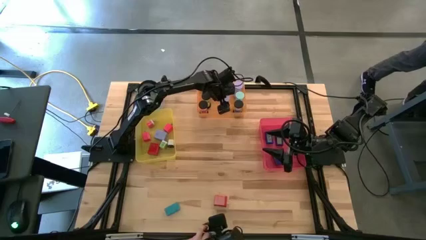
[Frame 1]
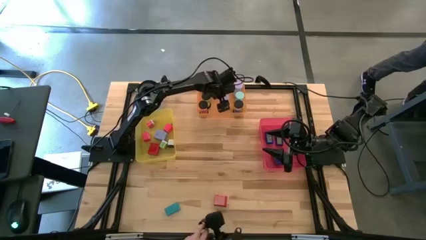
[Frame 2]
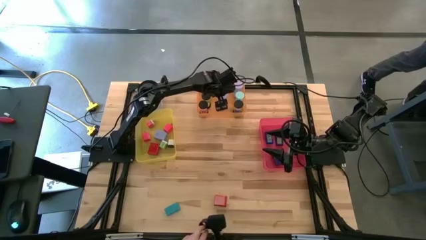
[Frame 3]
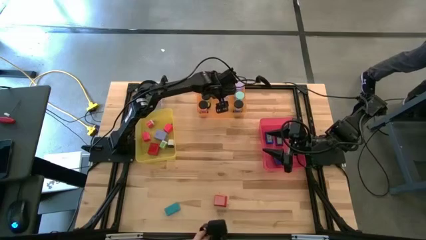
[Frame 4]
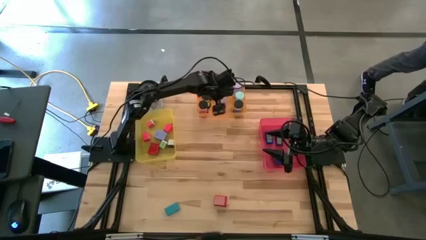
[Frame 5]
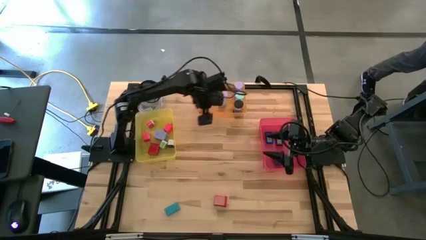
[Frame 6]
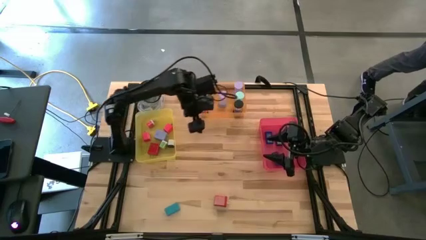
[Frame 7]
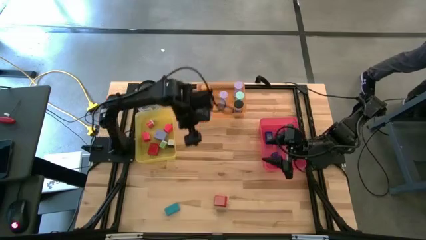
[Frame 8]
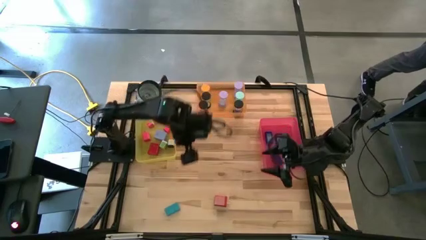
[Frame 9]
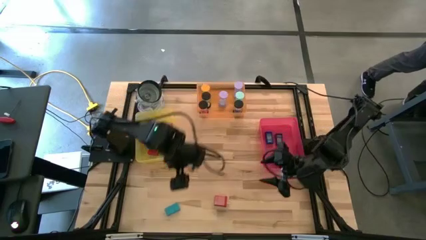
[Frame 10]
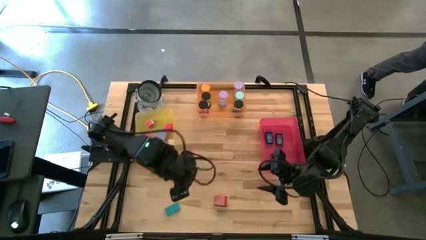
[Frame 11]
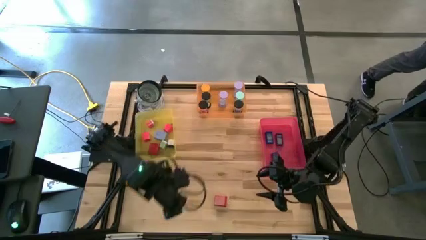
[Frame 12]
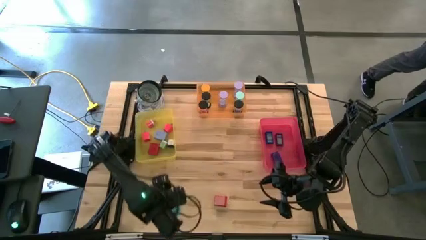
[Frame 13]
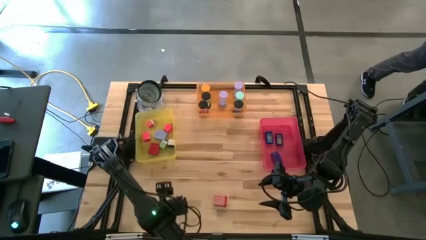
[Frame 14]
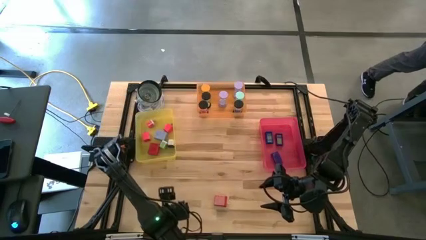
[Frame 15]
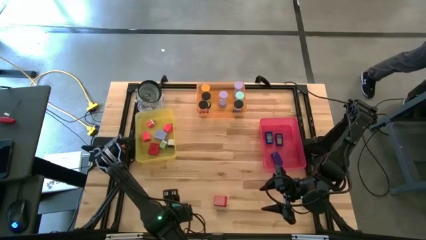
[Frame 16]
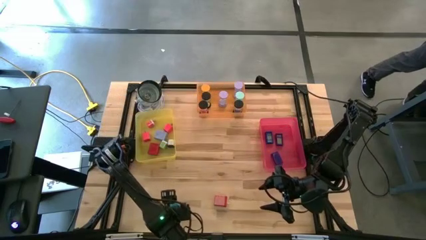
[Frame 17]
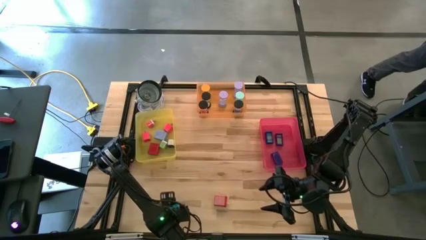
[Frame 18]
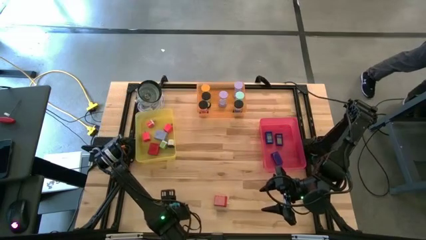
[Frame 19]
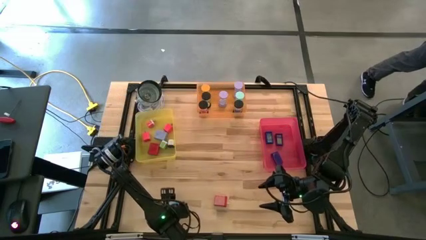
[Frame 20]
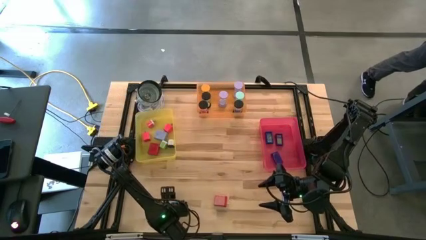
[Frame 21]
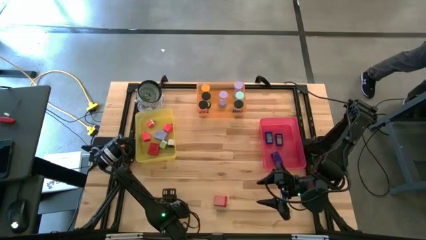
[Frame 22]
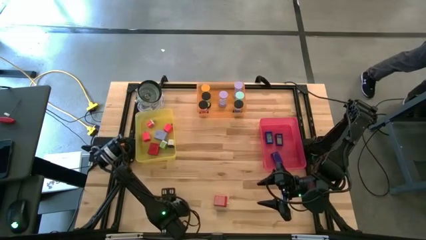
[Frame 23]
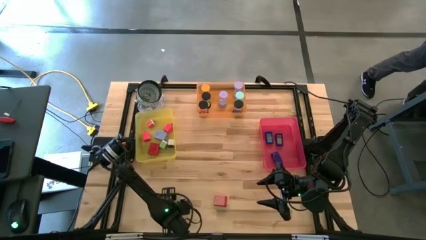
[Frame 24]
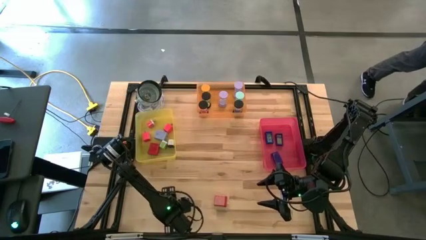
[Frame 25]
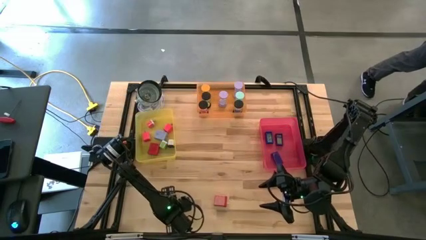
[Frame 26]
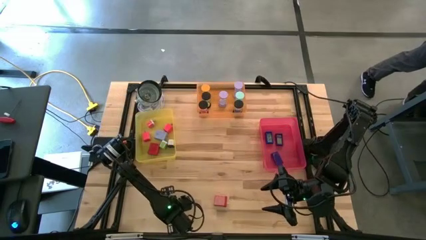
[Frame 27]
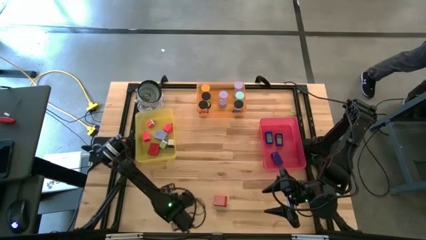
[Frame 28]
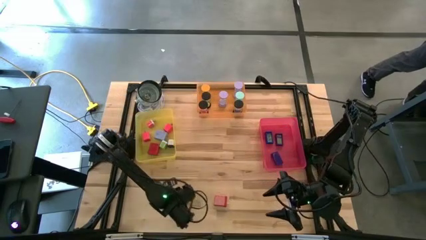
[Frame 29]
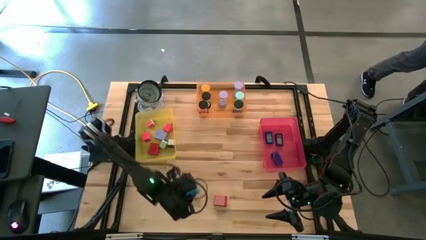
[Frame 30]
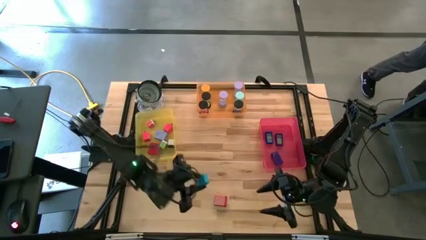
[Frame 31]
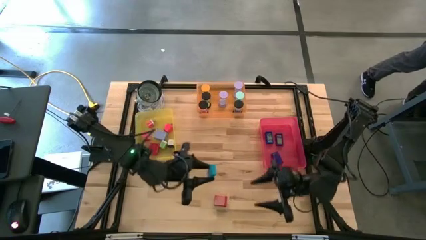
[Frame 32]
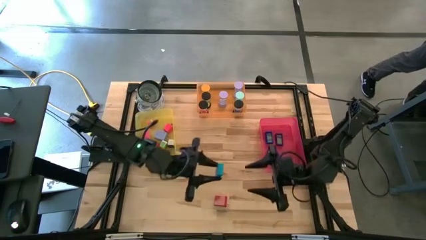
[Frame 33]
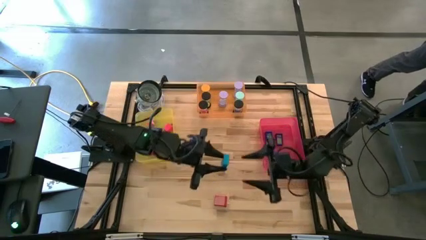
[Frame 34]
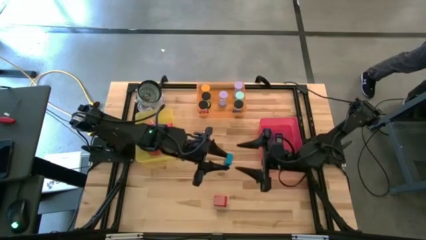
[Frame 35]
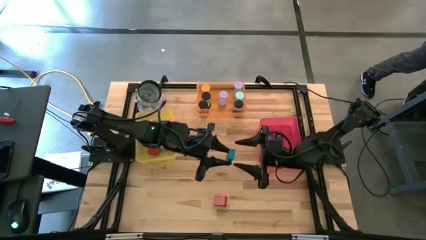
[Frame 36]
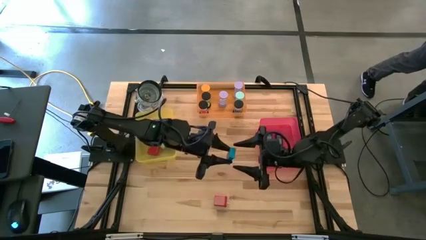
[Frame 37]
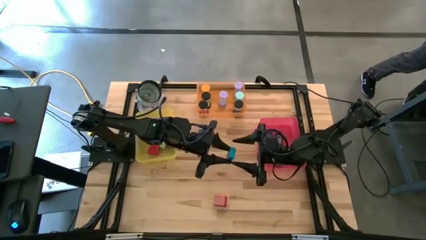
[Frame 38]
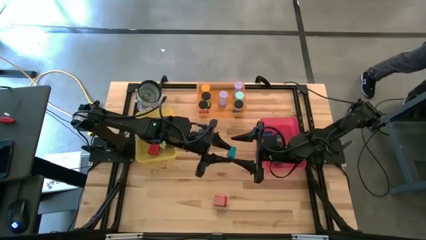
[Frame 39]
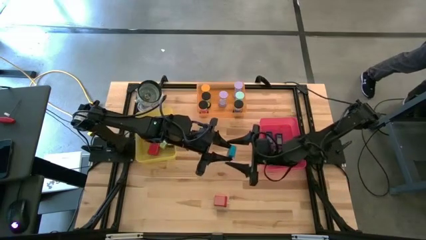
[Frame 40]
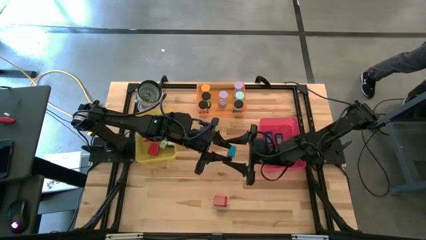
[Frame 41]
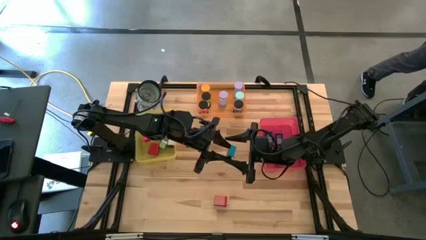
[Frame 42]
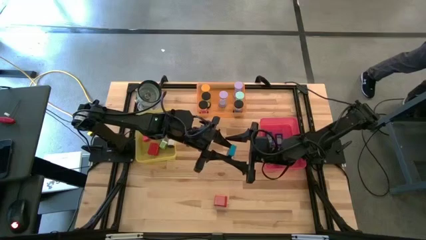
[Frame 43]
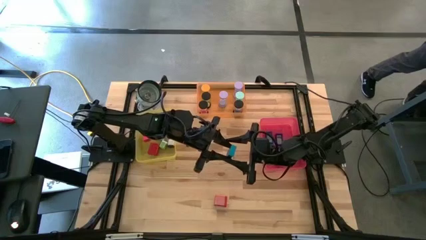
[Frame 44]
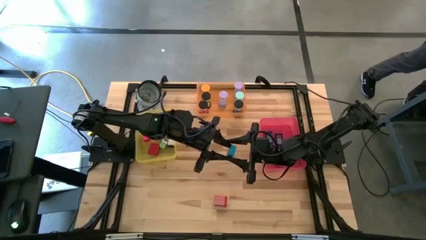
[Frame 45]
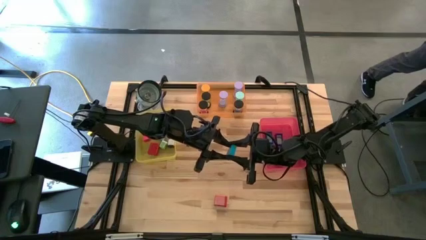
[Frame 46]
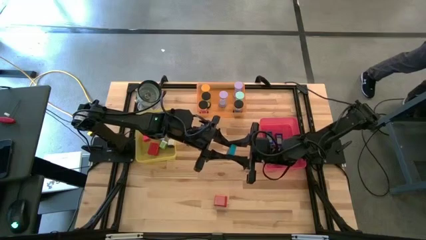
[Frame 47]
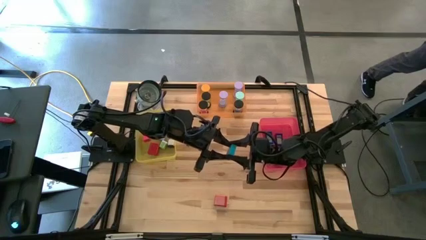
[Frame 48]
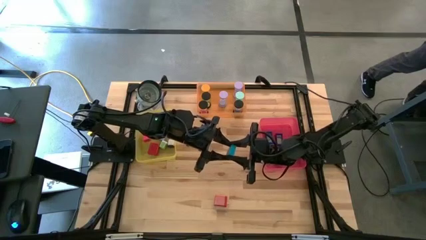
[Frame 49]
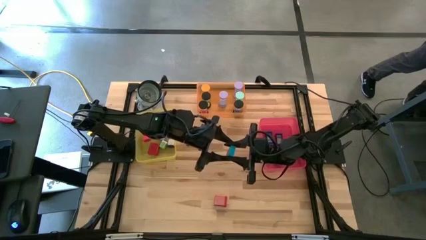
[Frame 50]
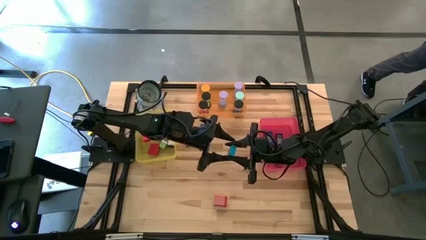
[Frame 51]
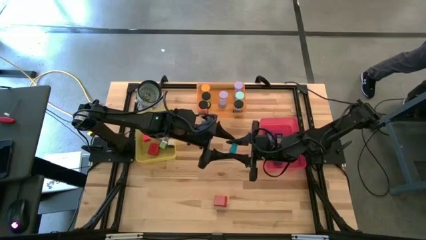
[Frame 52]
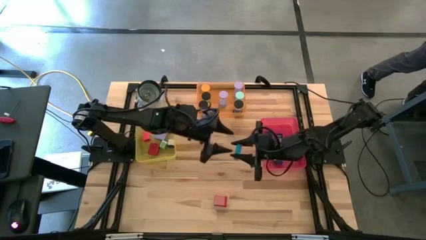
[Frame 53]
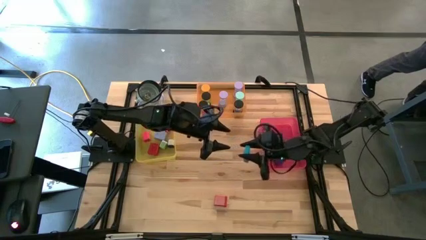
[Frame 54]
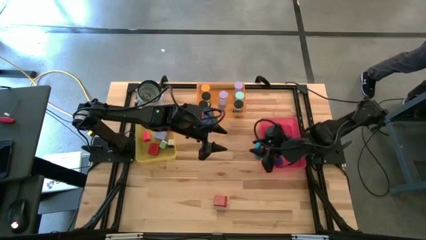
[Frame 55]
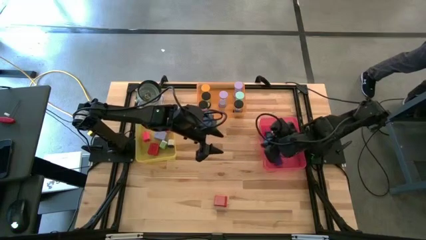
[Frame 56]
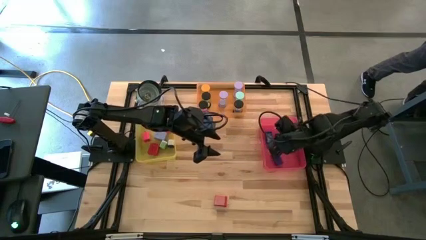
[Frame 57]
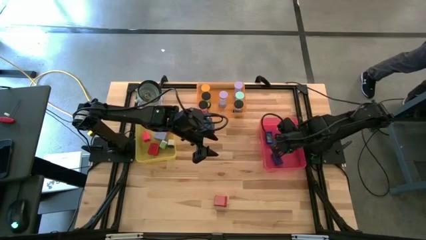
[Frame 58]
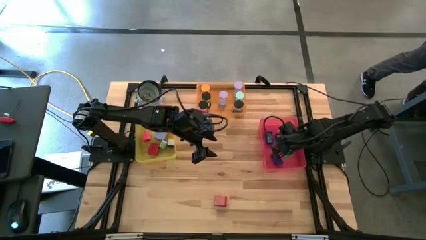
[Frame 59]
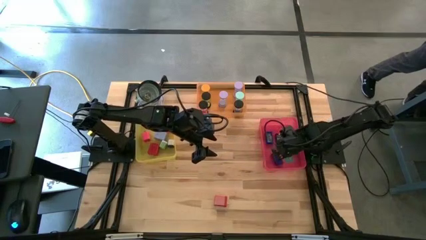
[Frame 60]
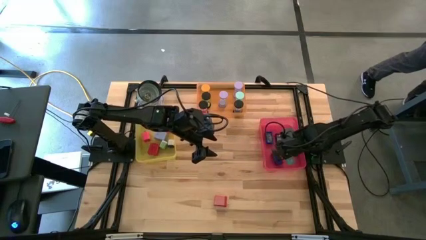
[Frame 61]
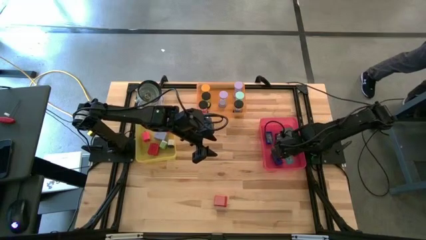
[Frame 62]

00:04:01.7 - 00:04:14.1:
Task: Pick & Place Office items
Put the blue clock in the red bin

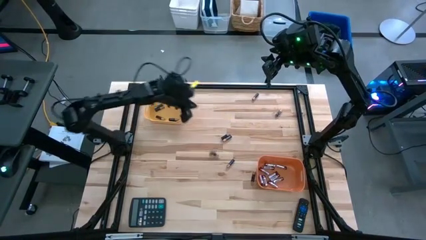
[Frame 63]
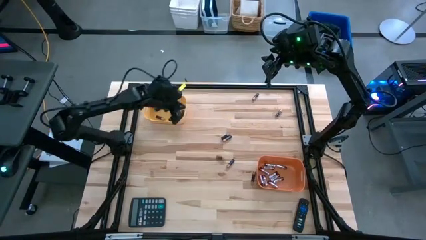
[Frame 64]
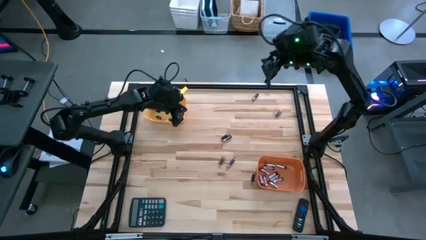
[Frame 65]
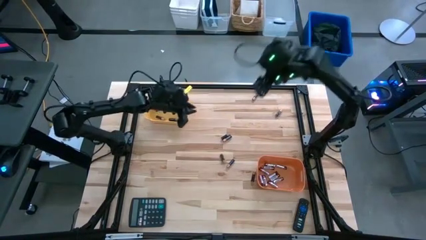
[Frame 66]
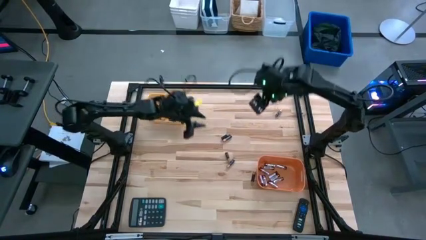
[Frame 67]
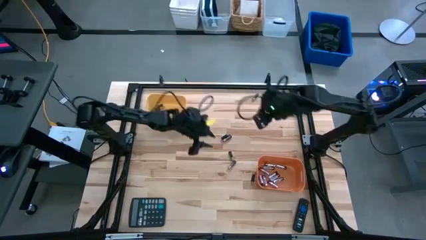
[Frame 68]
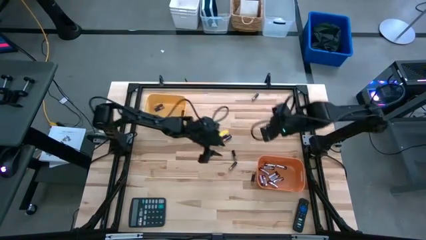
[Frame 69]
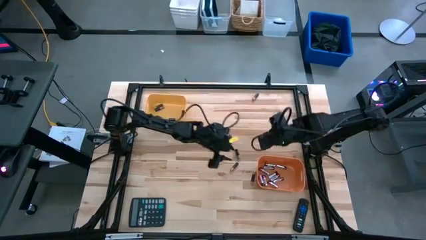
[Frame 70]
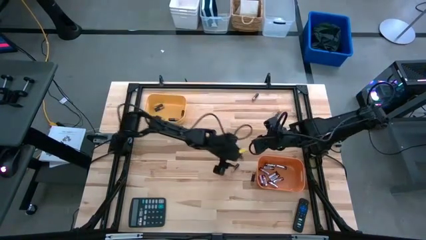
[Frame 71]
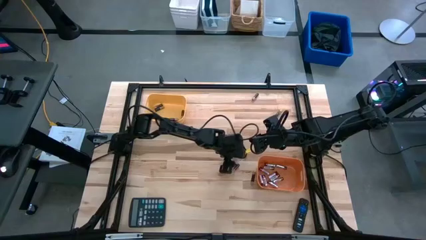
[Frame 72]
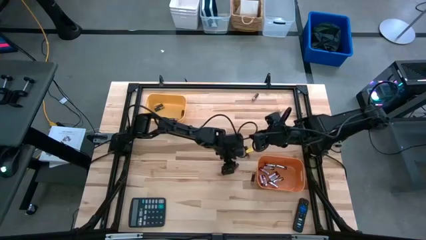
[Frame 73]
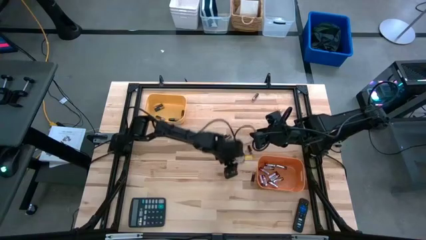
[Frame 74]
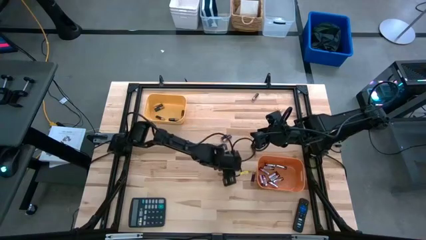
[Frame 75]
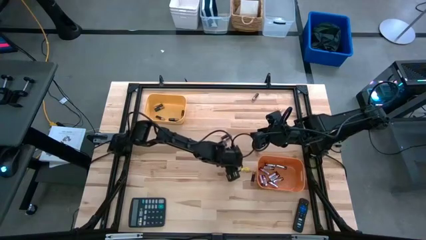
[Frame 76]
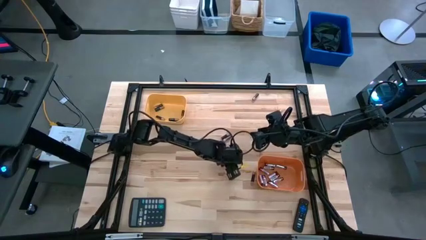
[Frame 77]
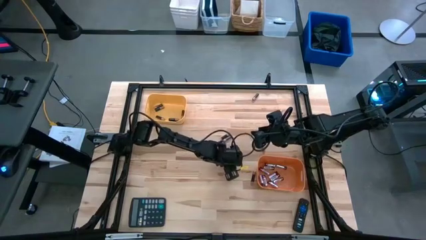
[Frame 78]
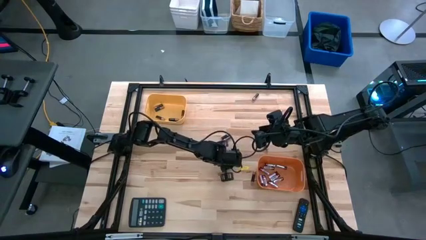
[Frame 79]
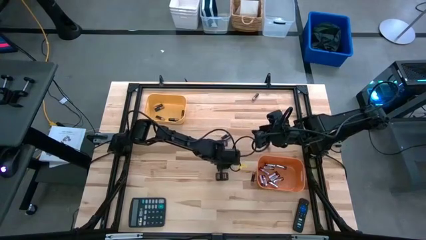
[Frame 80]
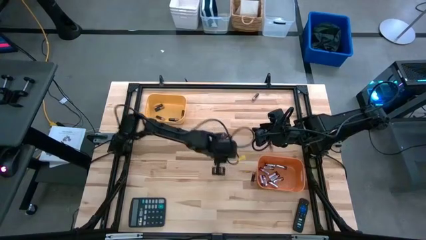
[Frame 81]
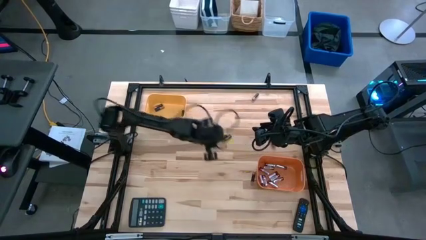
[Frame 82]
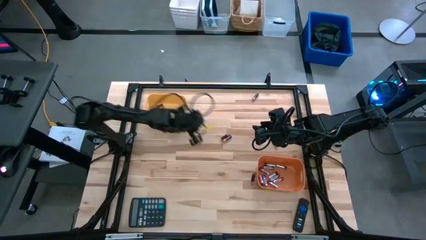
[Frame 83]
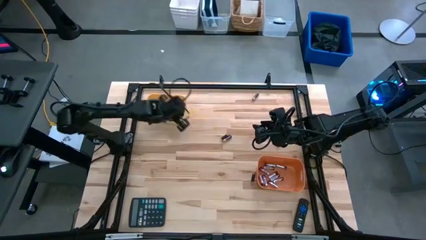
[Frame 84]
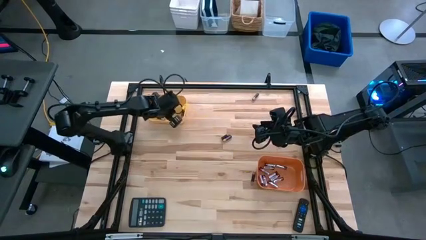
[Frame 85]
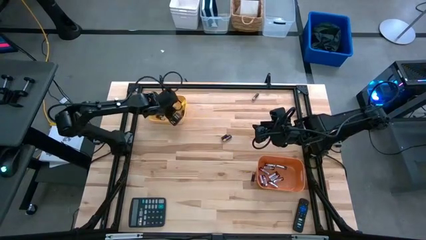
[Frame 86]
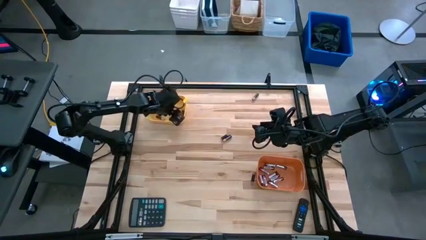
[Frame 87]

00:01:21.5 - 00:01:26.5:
Task: Sort batteries
Put the black battery into the yellow bin
